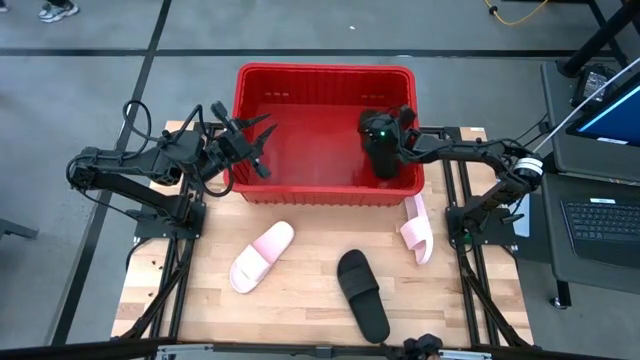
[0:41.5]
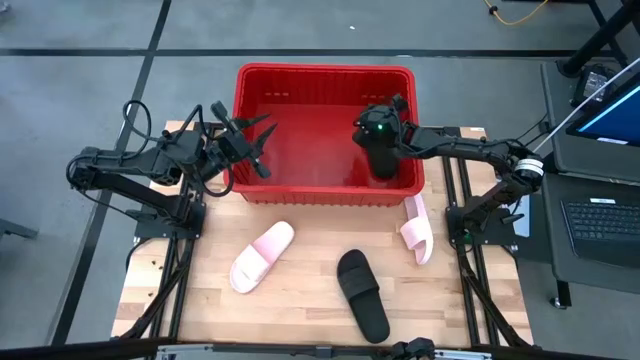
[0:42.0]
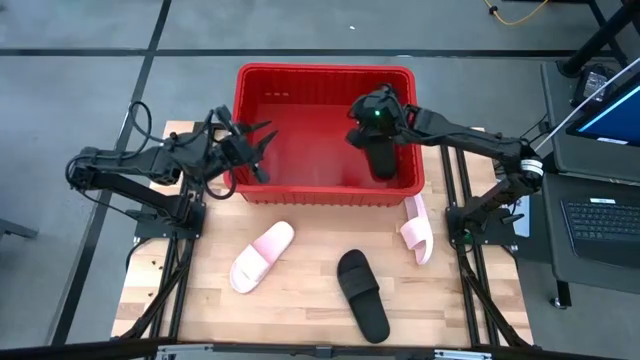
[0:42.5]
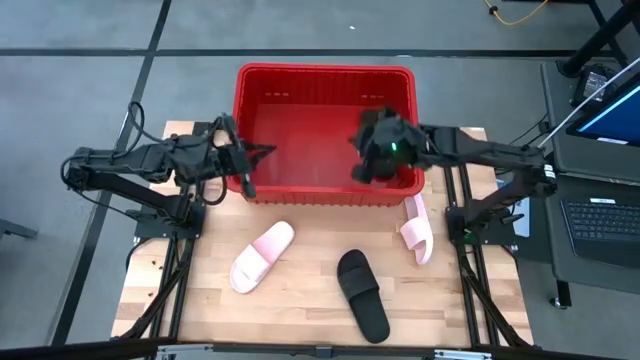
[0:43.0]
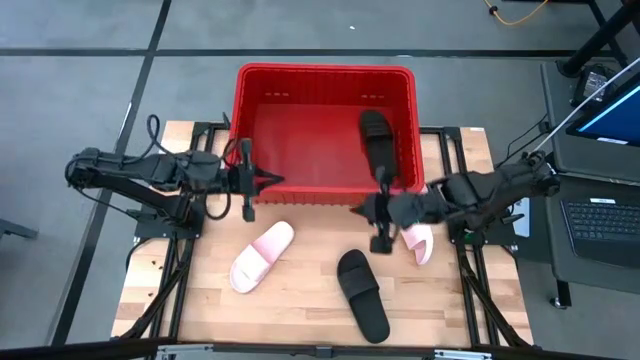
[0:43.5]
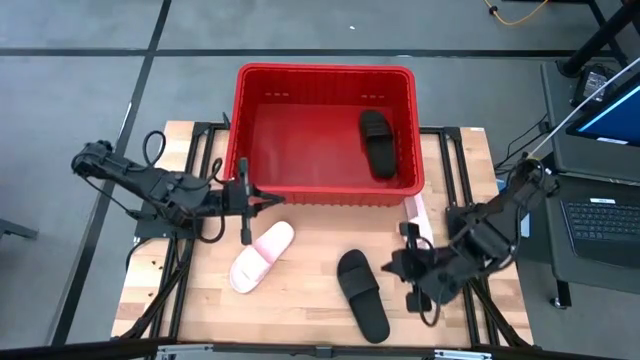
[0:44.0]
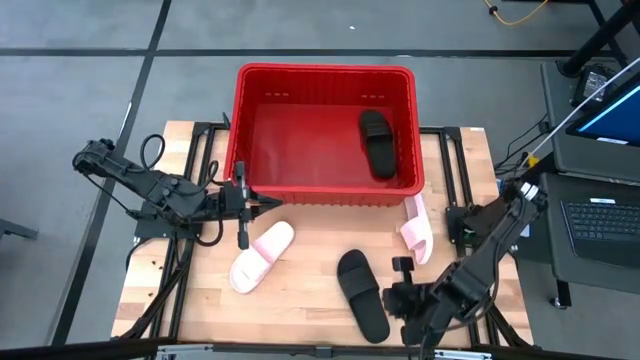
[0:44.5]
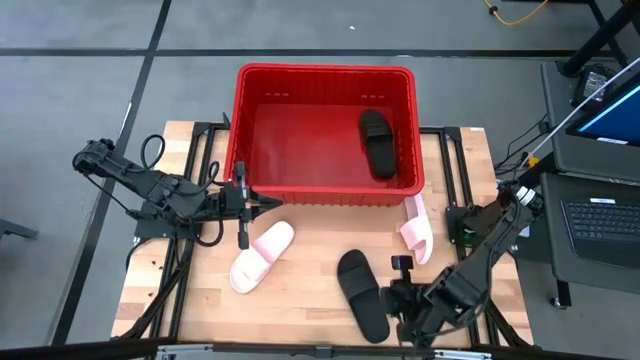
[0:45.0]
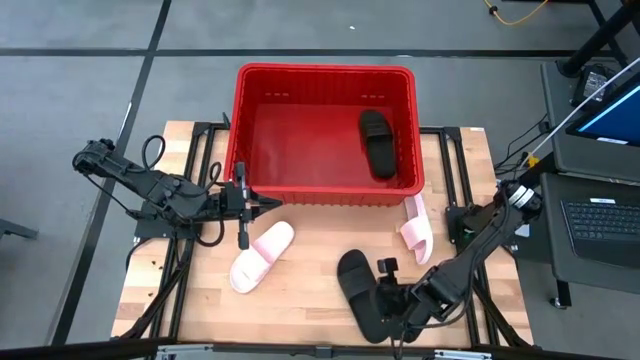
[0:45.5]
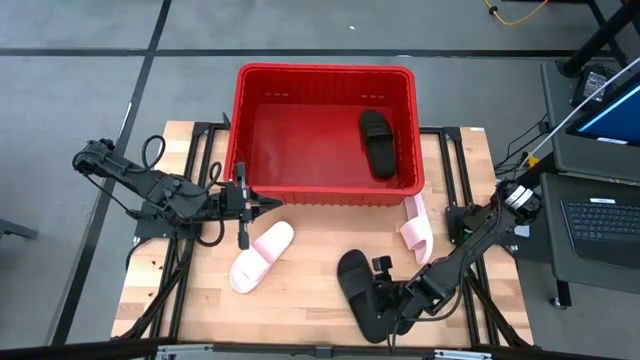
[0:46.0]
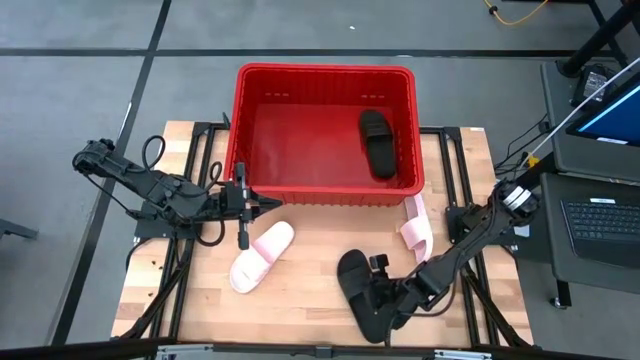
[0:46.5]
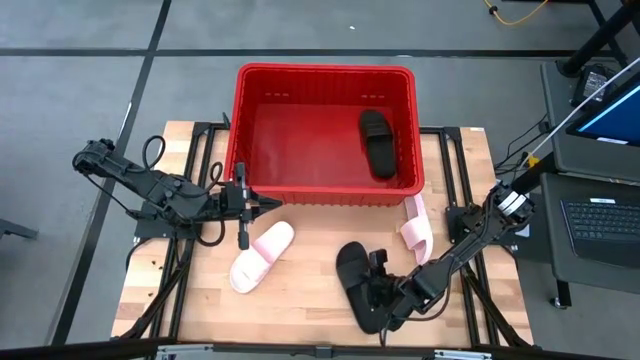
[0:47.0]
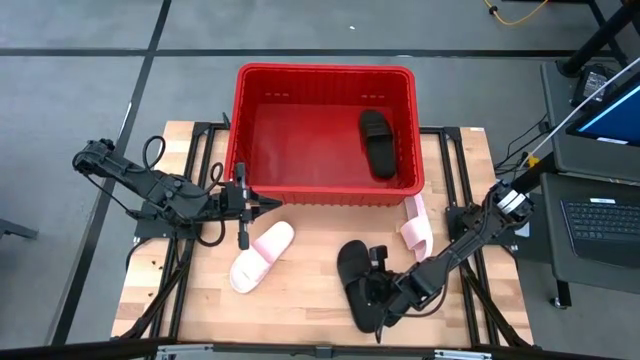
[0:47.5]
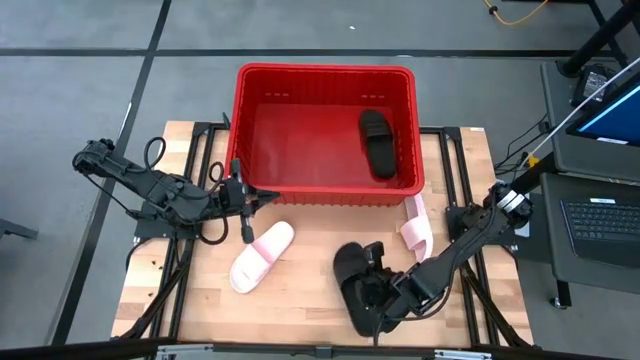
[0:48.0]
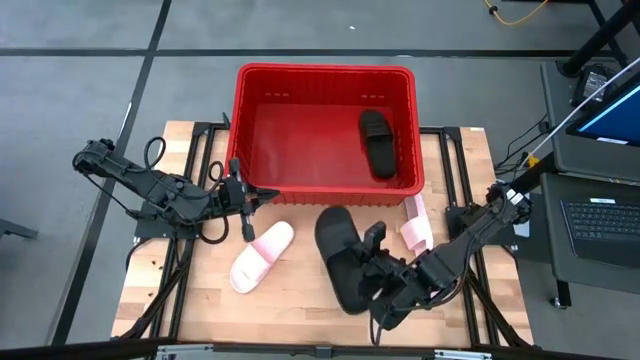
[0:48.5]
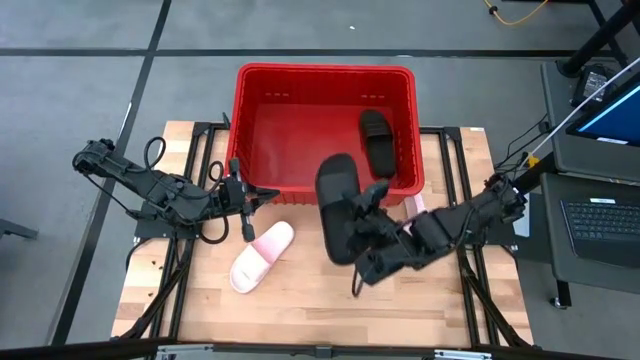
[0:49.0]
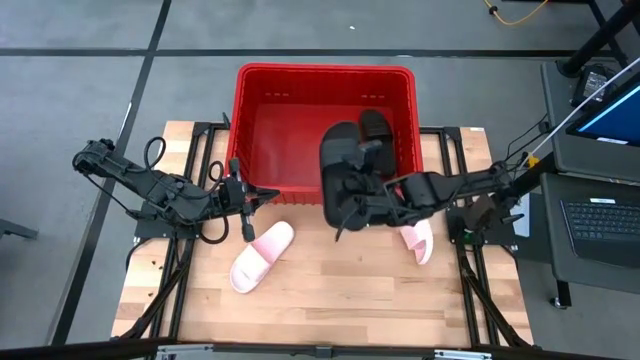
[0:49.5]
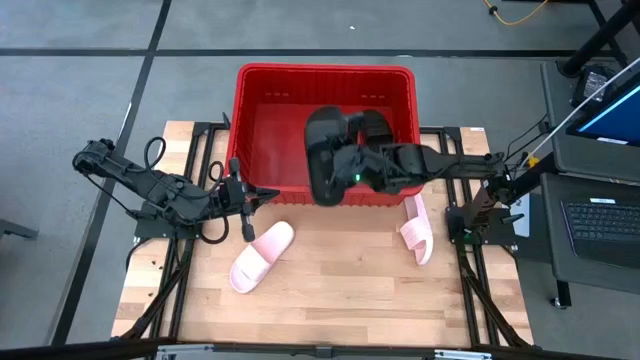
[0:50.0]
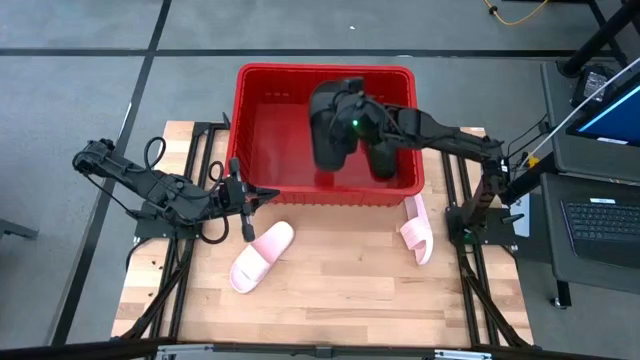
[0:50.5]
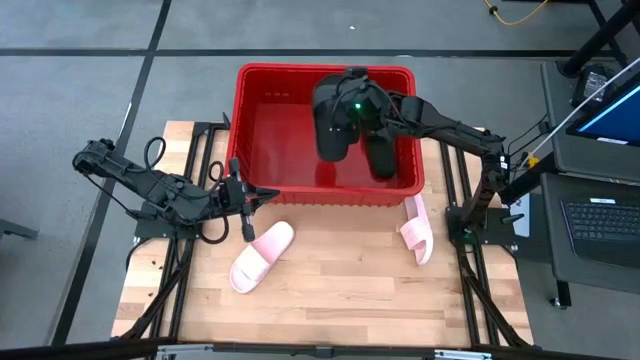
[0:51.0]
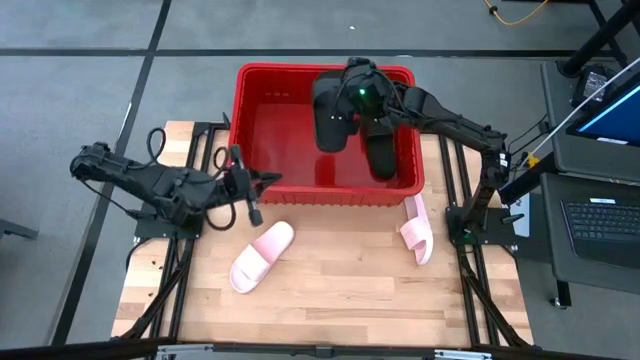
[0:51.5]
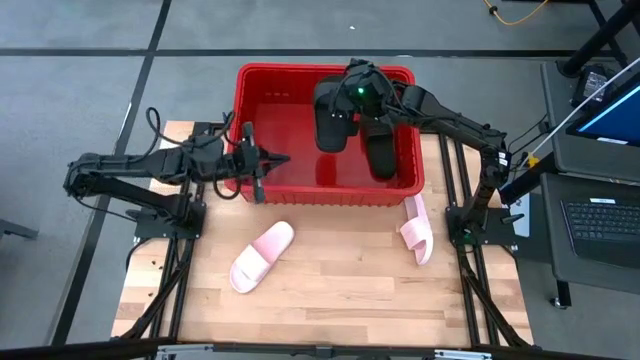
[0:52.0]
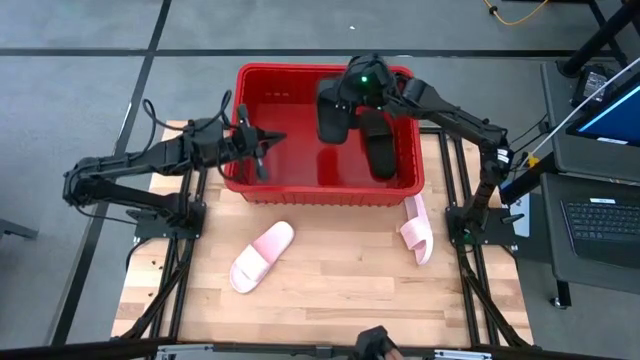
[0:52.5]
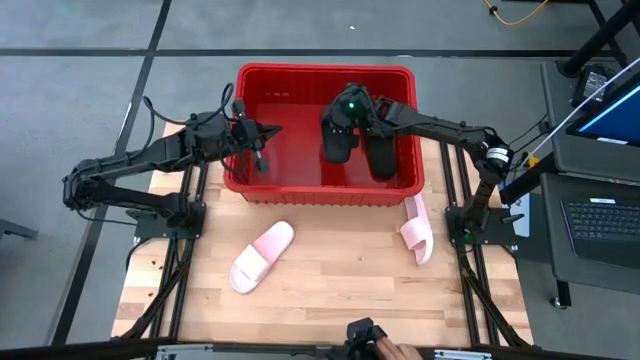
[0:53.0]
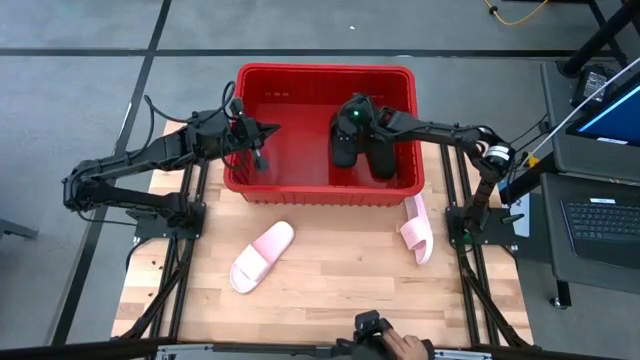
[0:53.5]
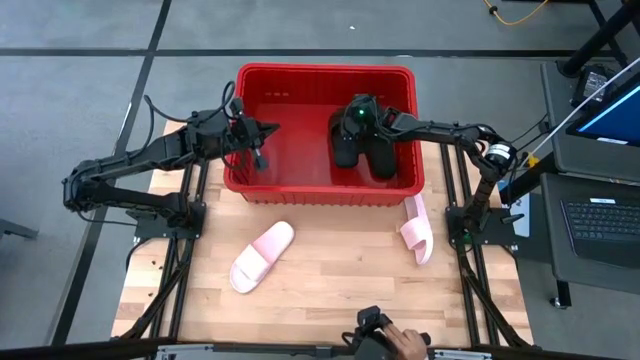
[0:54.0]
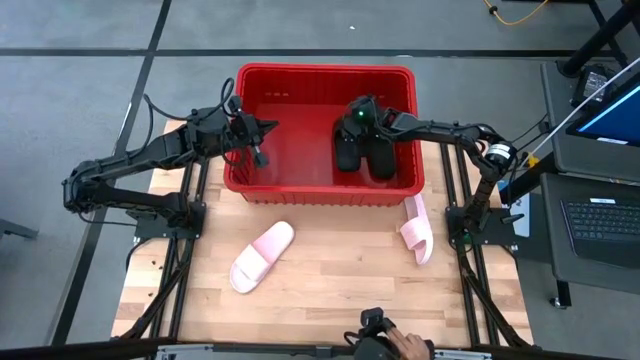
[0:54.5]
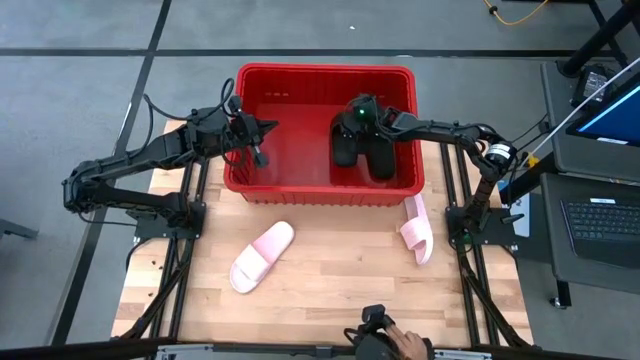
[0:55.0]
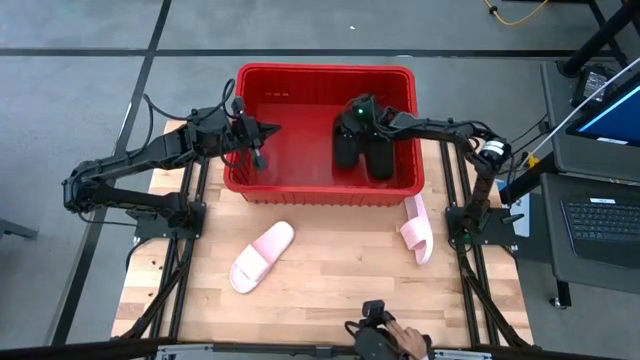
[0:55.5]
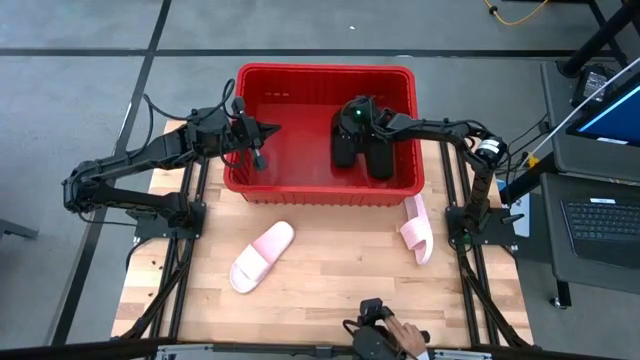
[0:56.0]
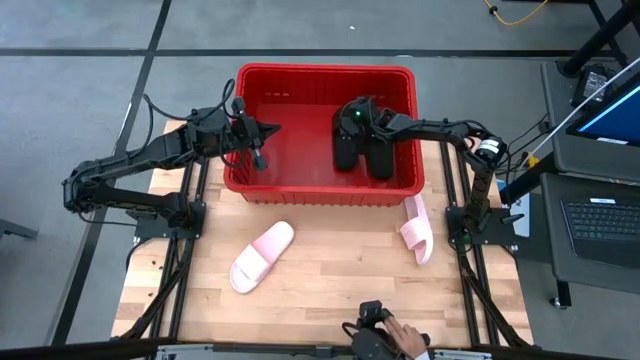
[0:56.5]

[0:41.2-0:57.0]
Task: Pick and place slides into bin
Put the black slipper into the red bin
